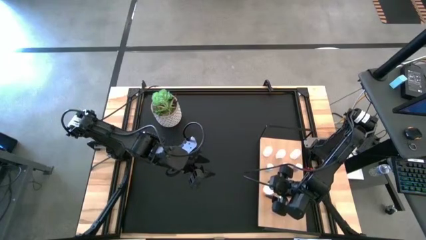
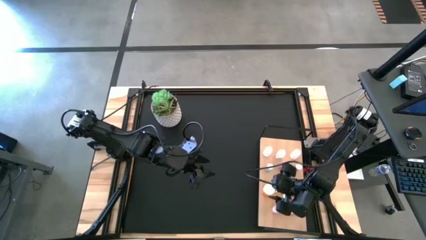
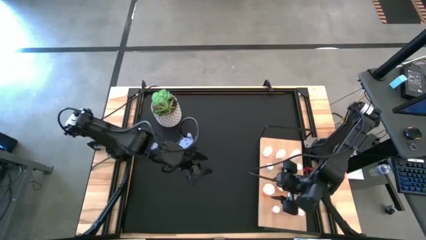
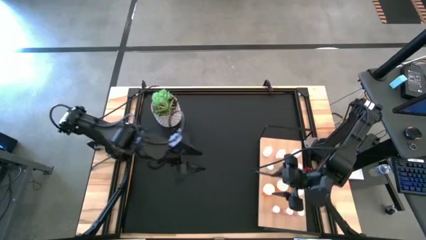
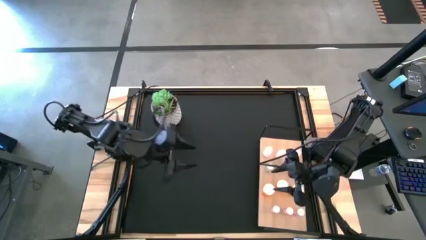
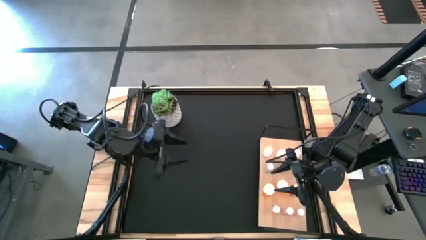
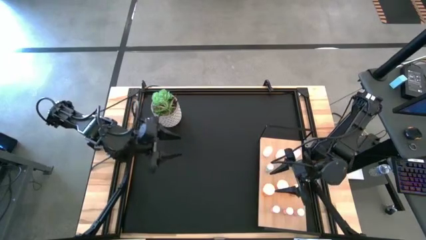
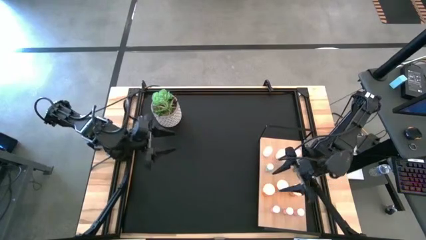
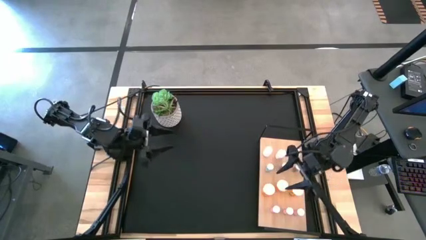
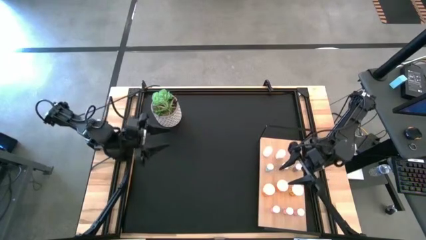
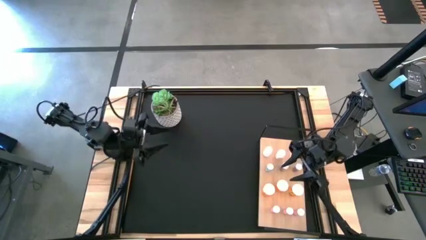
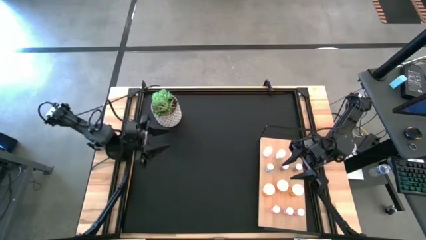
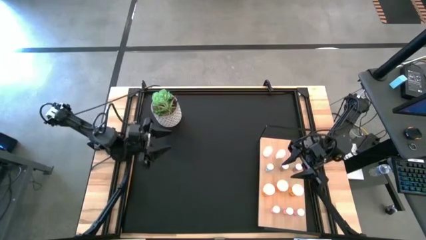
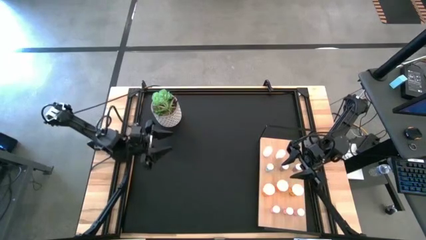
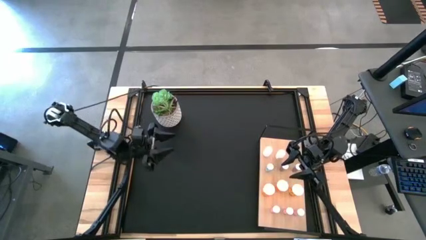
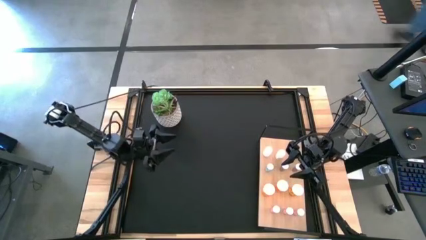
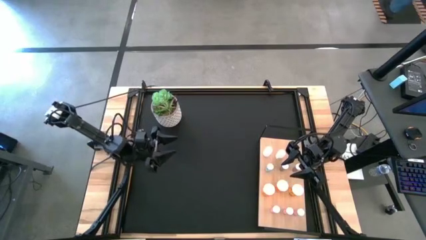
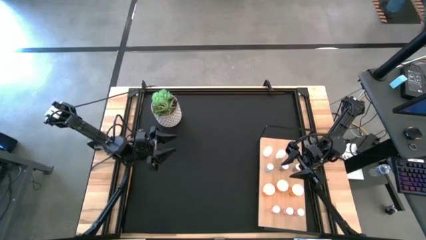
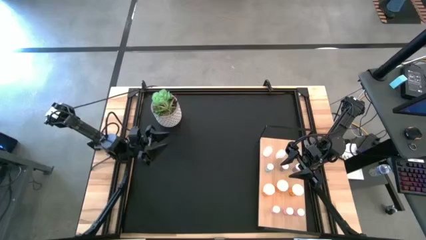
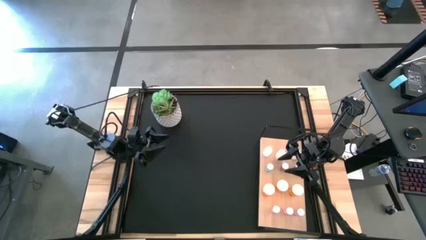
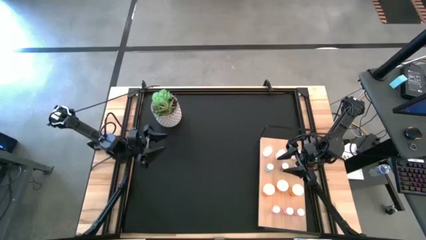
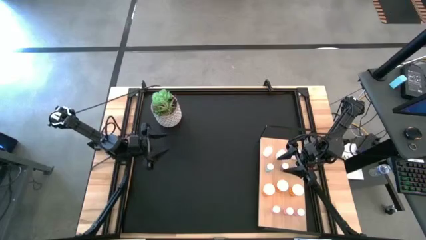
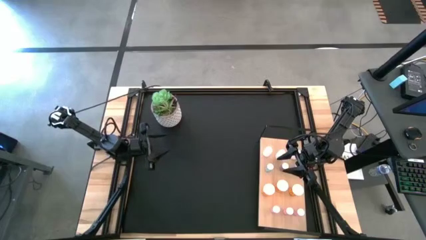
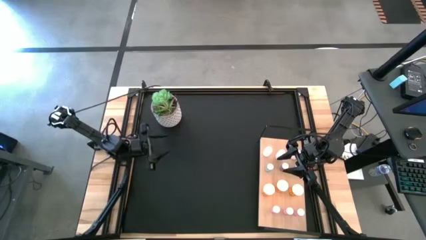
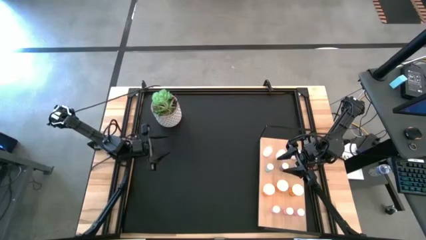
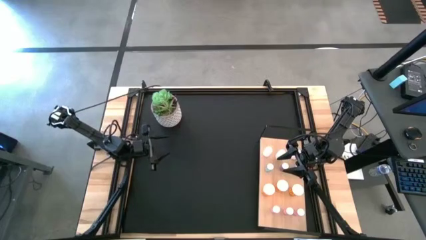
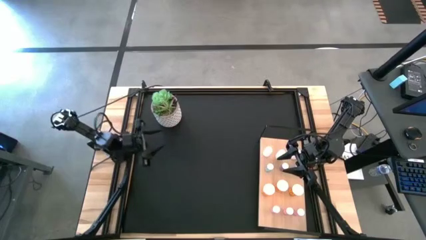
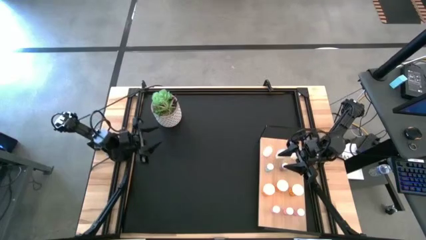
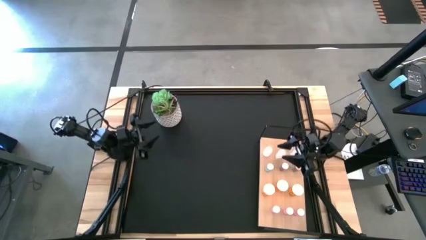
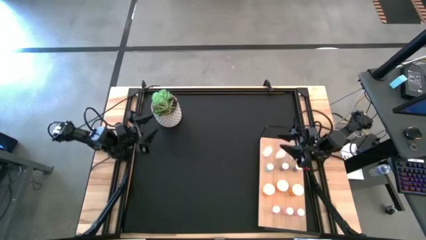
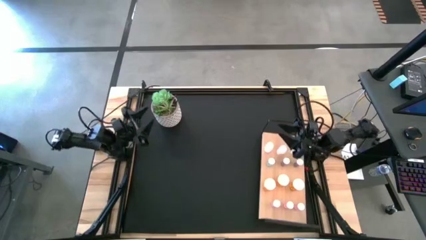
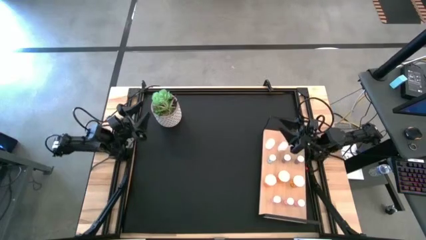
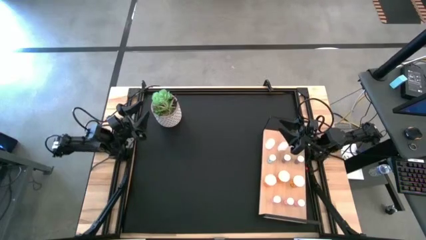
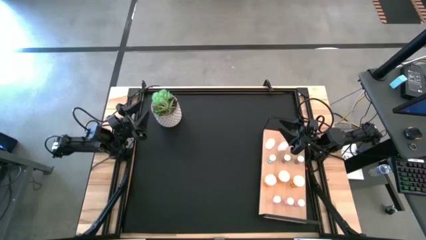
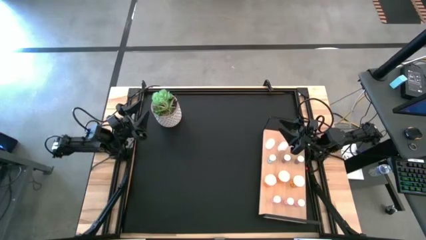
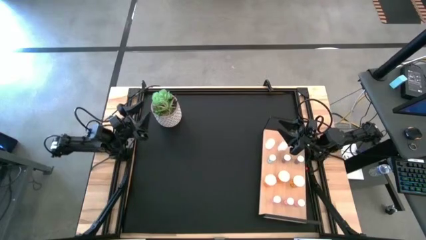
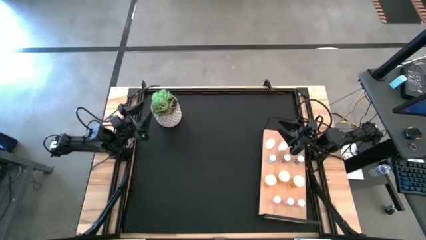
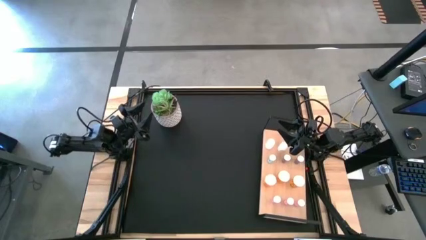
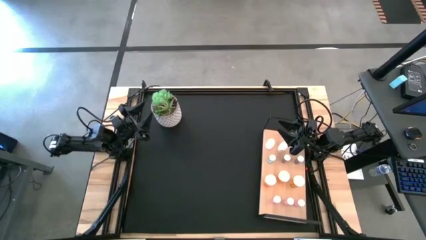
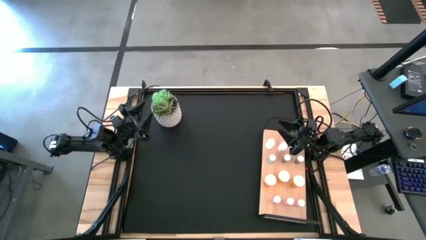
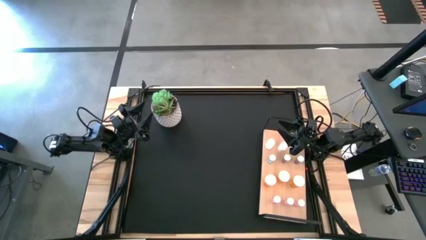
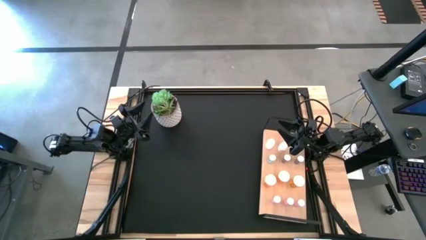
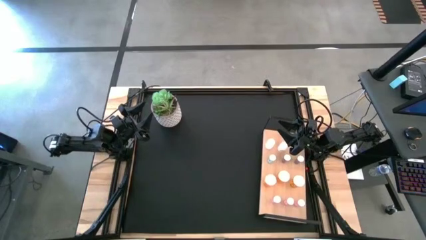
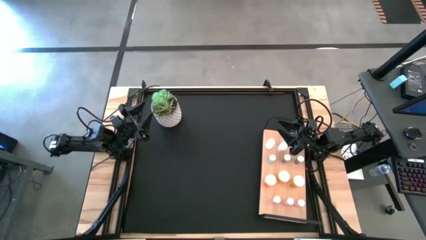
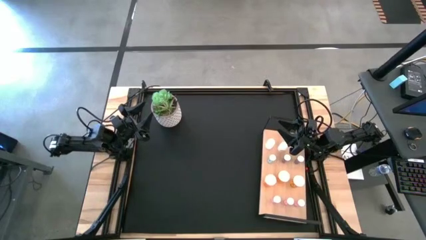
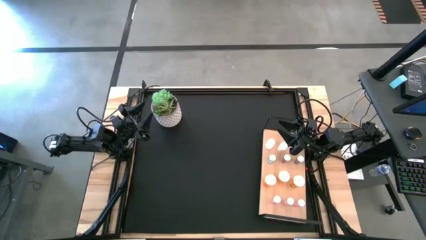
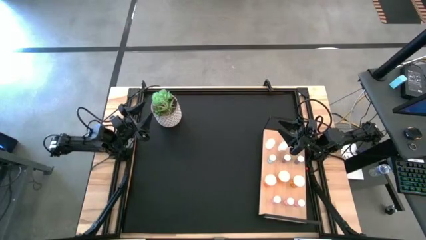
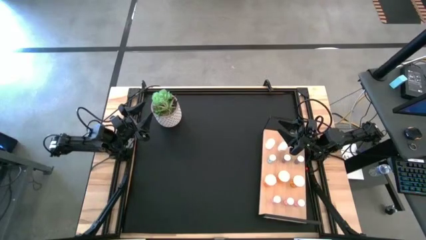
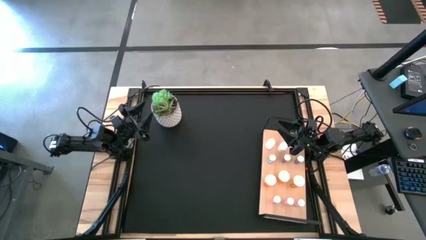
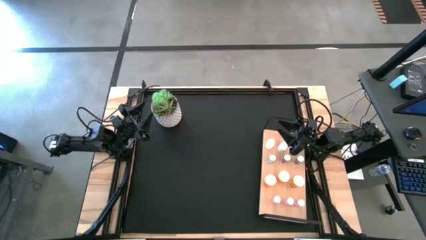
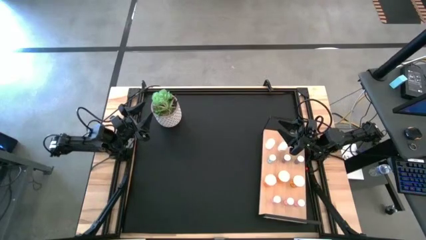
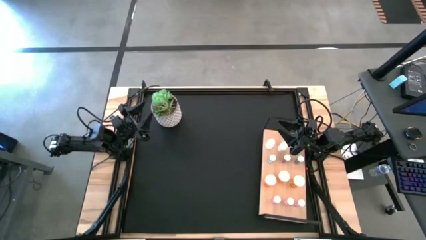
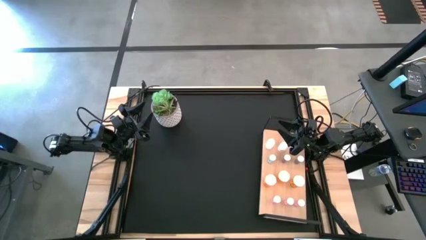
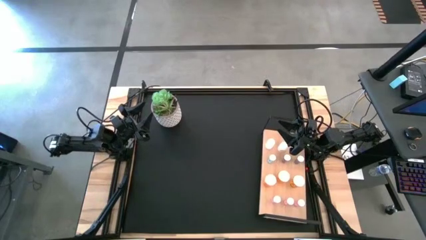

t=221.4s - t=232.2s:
Task: Pick and place medicine bottles onto shelf by color
Return to Home Position

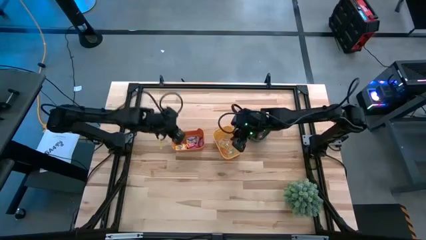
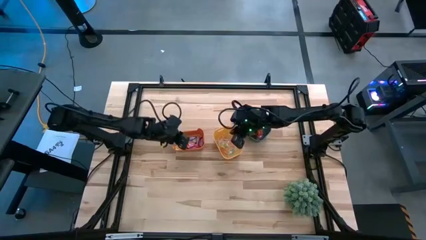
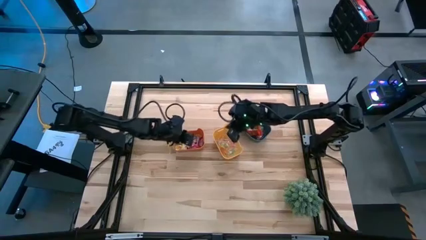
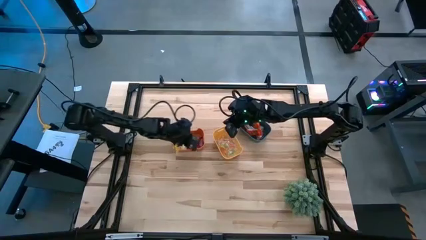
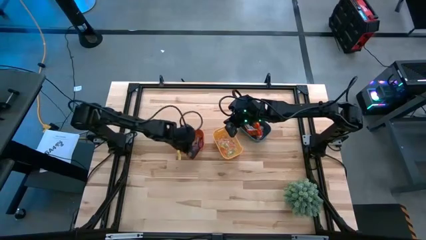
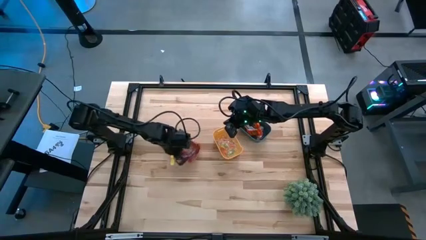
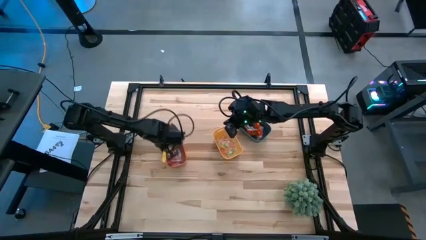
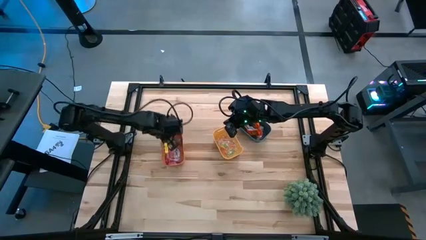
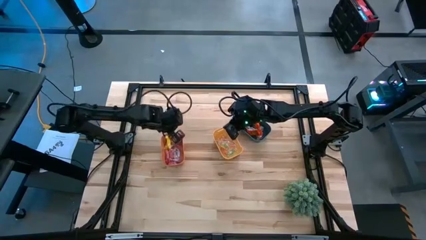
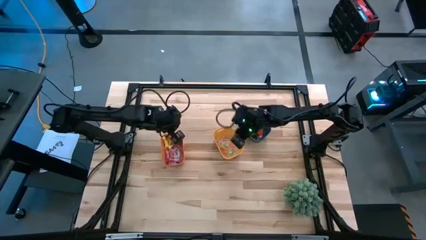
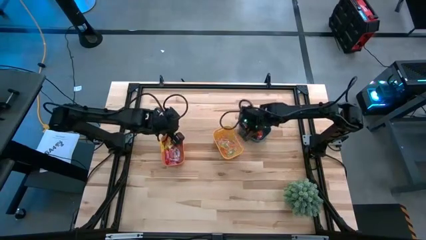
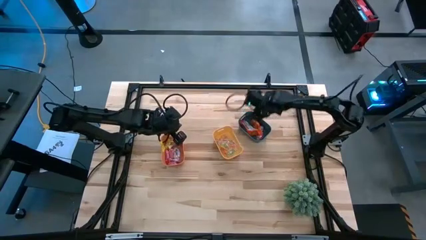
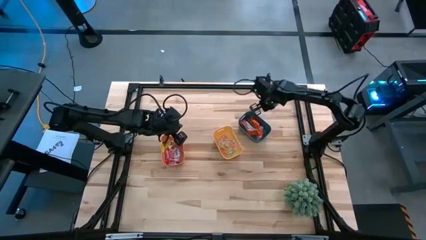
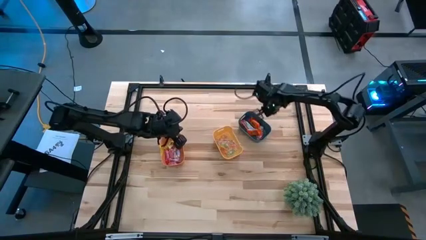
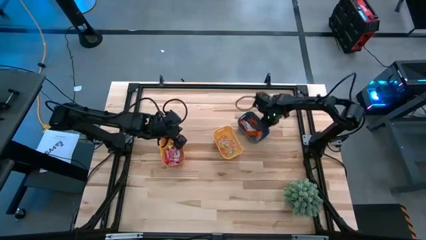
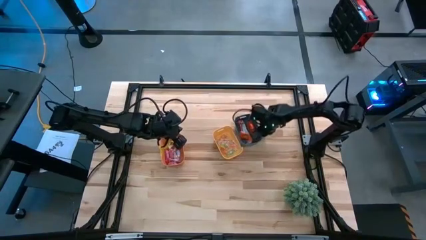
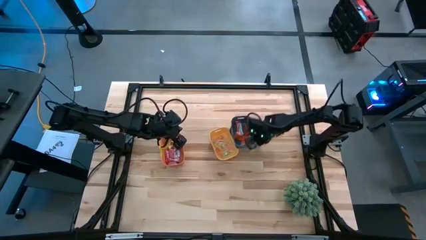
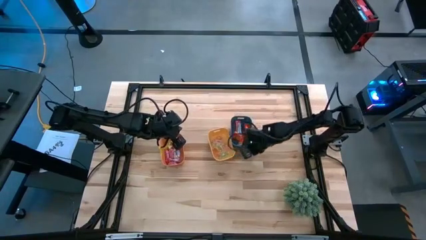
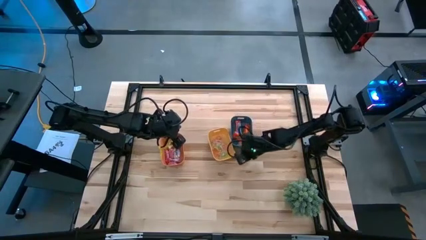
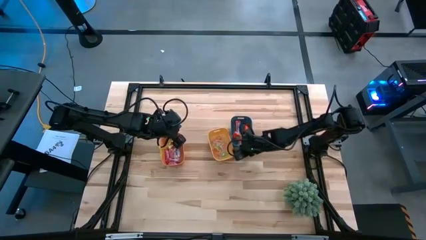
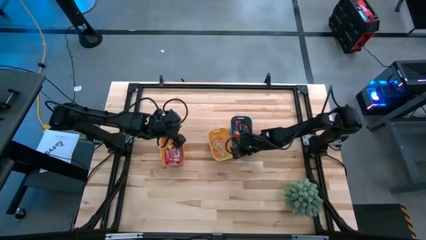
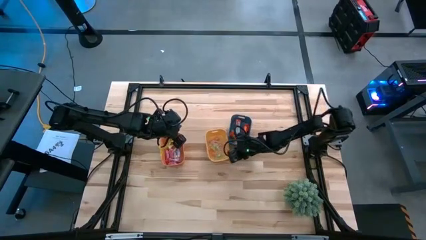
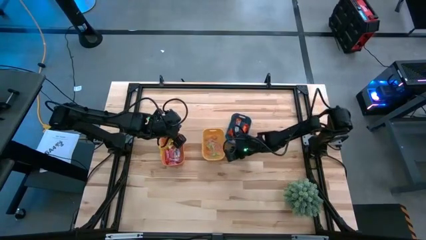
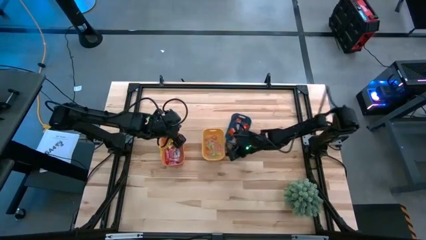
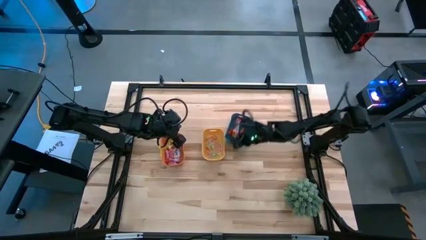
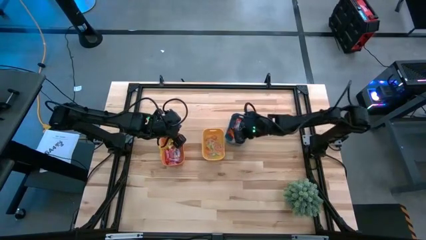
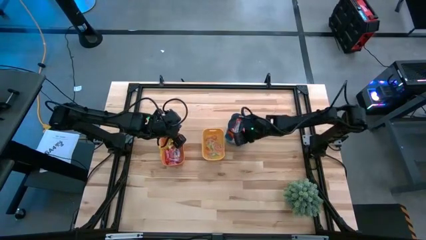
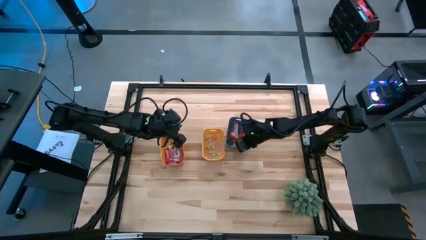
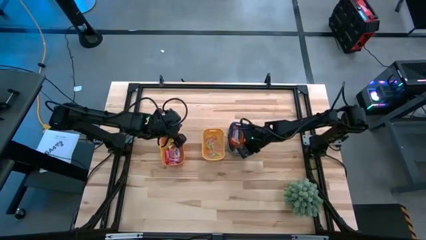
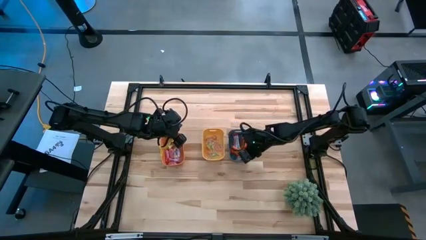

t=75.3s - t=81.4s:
Task: Sort candy
Adjust the bins
